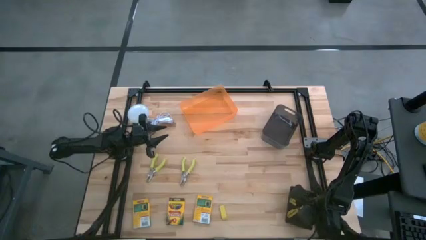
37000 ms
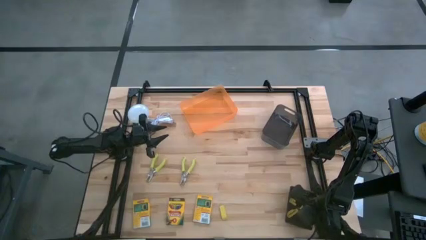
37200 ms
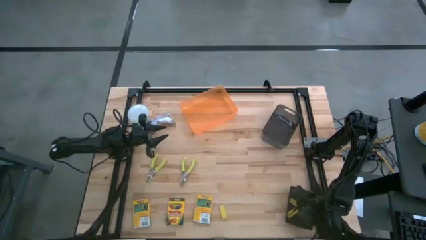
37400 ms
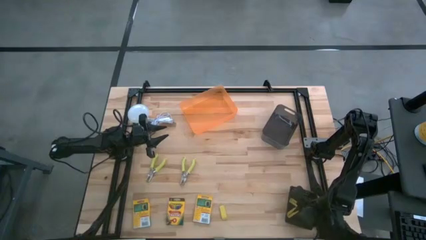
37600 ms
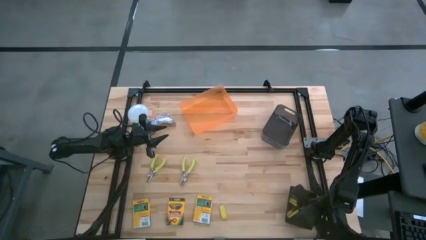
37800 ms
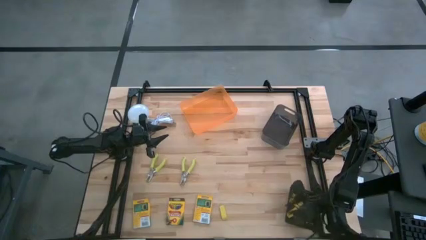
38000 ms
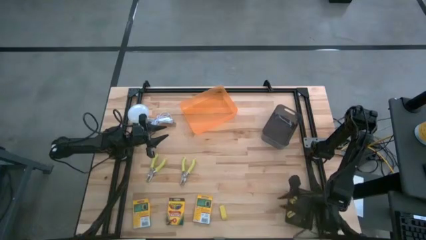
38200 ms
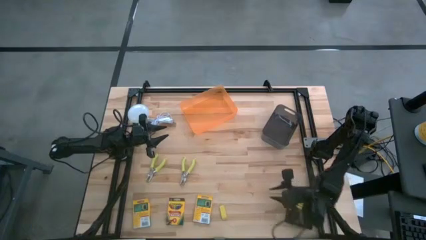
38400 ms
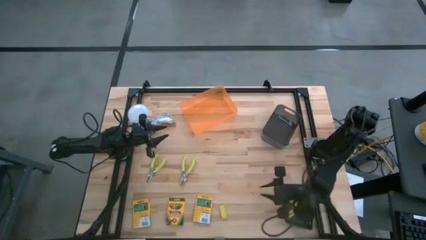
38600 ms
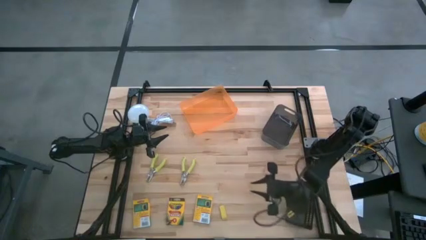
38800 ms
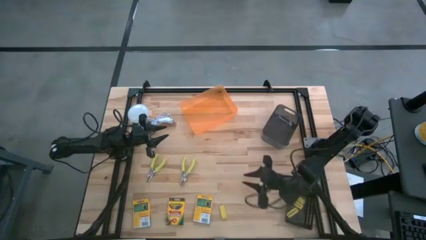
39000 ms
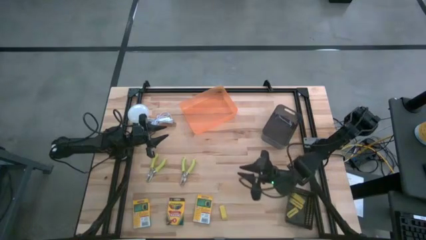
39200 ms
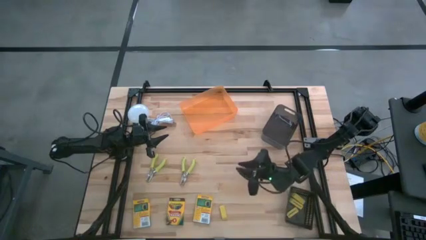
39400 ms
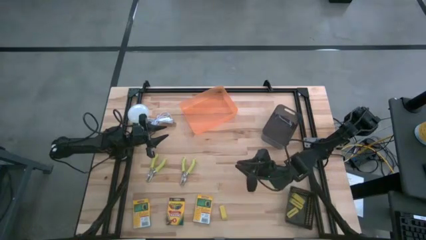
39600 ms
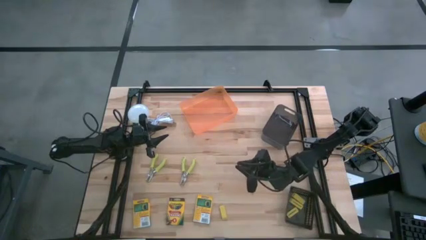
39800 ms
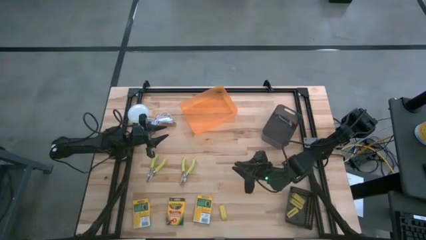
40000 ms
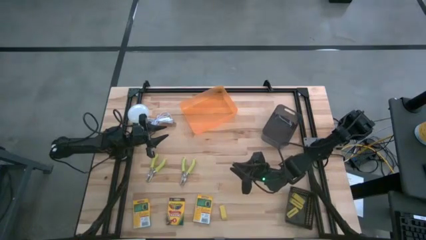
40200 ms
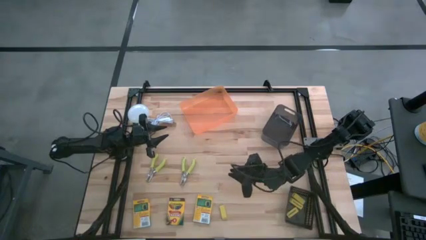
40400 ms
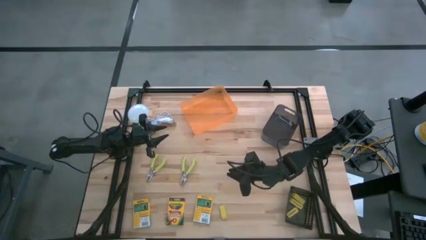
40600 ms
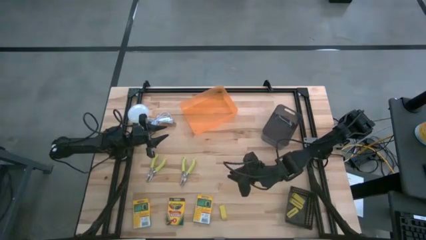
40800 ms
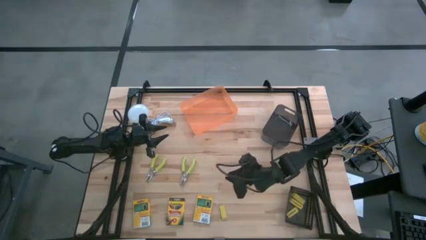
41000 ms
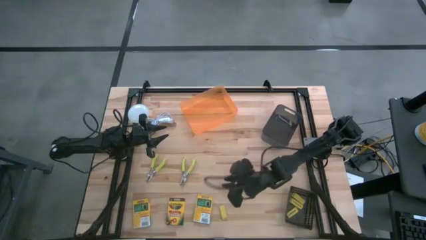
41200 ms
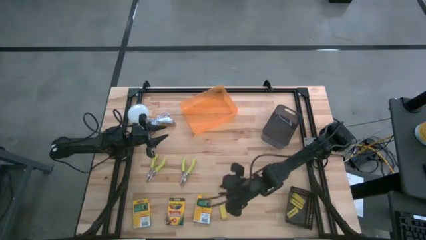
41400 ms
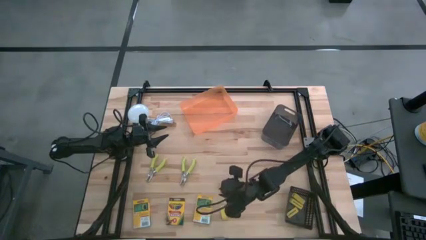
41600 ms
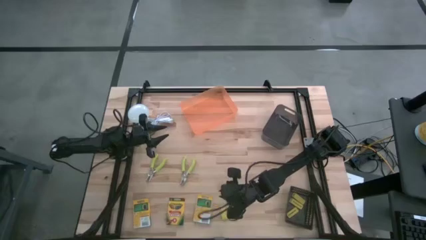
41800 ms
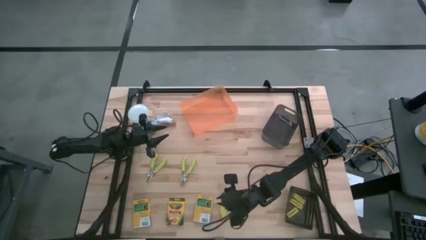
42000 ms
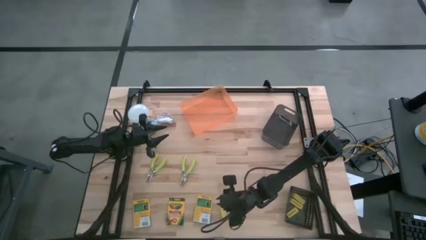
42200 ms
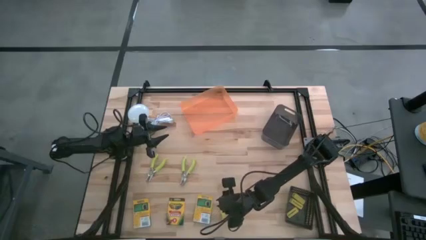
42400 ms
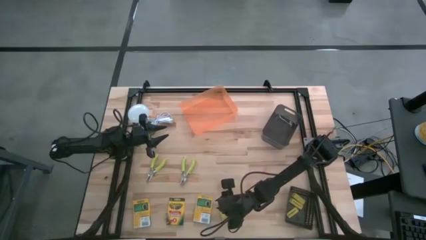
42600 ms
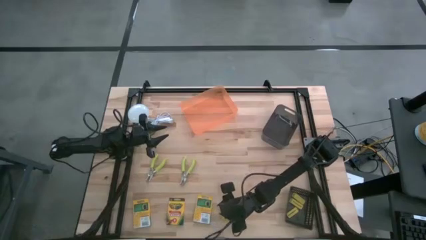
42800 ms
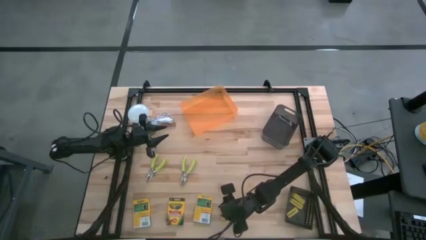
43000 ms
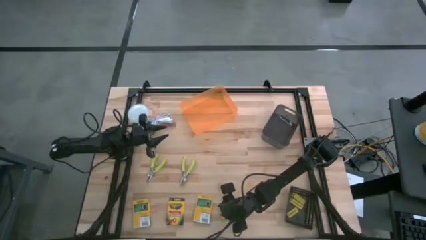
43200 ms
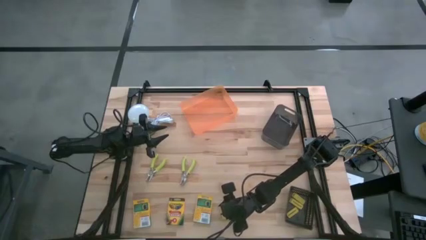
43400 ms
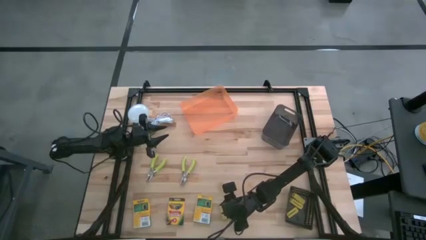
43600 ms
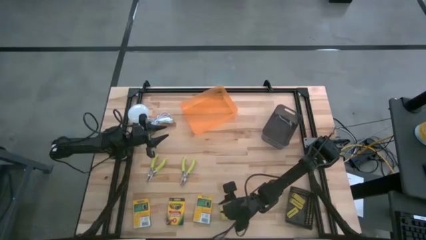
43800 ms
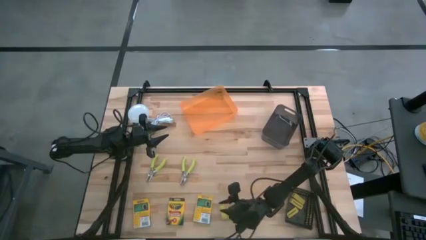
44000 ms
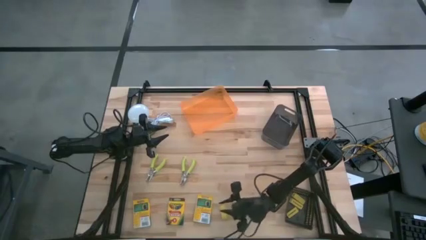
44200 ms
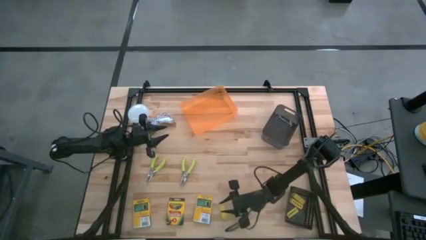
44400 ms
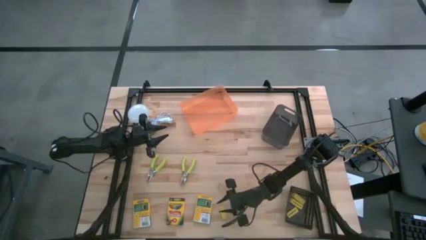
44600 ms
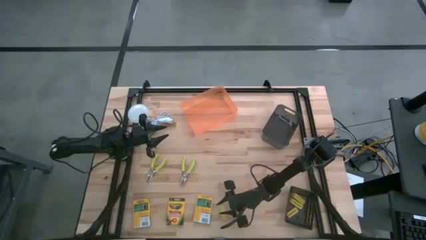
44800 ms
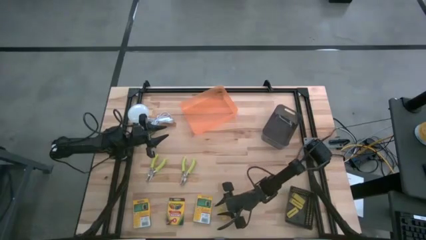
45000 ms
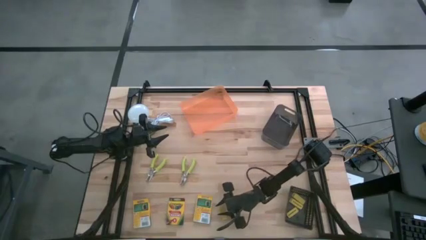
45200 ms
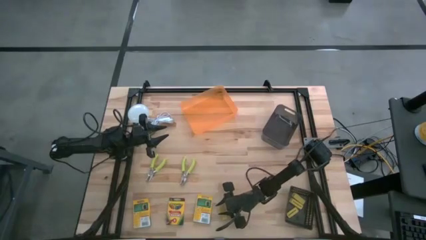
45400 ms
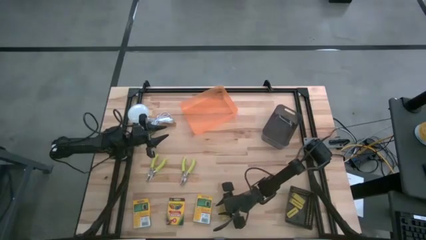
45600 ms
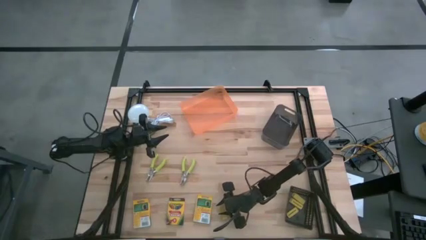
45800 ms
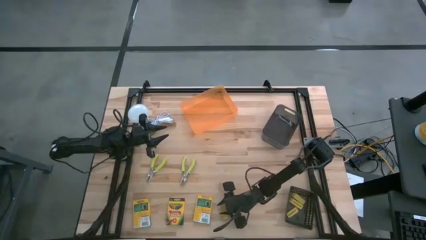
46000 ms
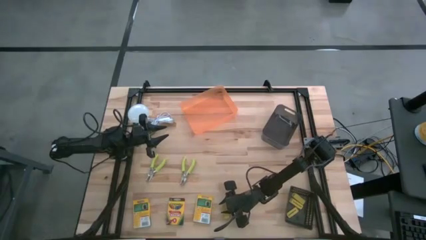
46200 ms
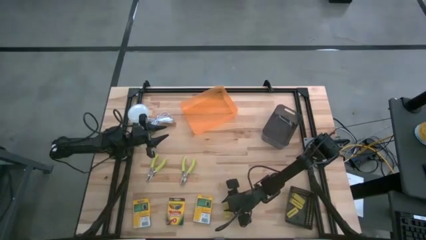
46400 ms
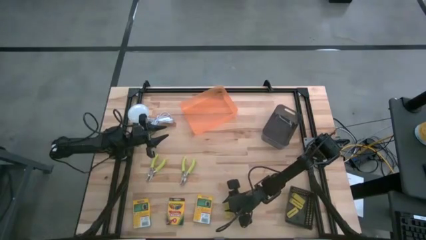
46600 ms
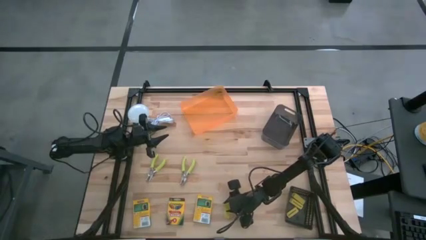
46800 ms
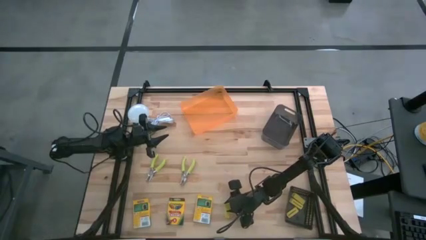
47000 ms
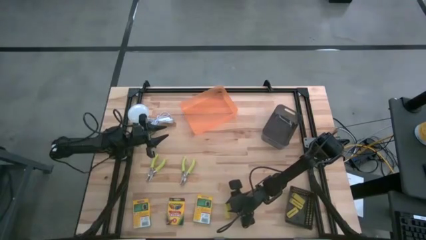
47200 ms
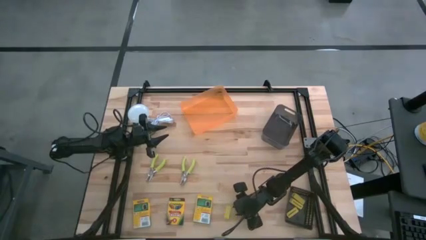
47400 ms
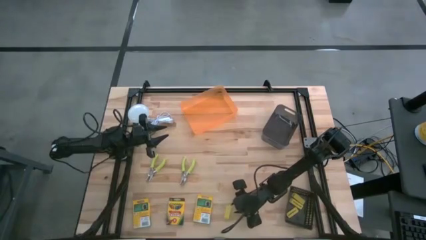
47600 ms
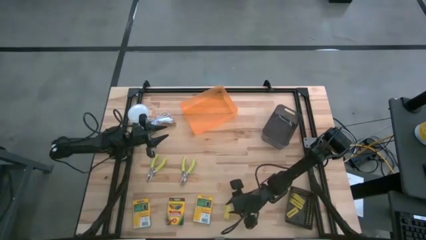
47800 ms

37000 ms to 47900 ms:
Task: Pick & Place School Supplies
Put the yellow eraser into the black basket

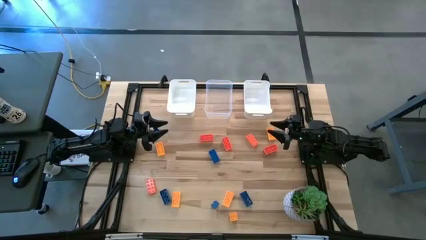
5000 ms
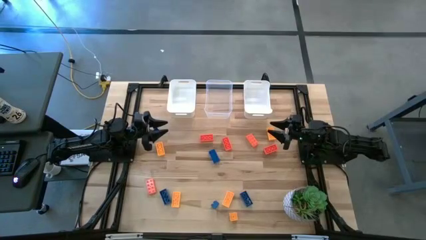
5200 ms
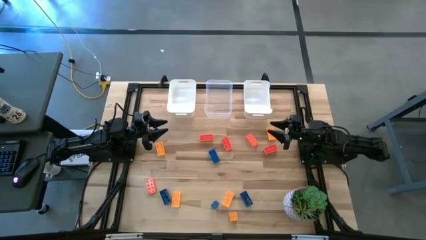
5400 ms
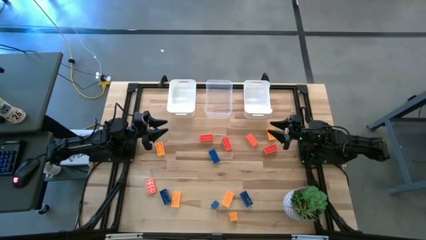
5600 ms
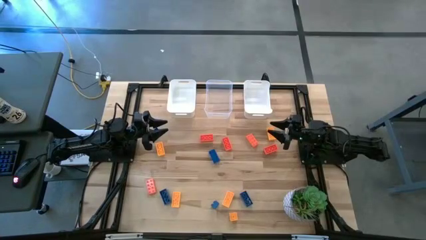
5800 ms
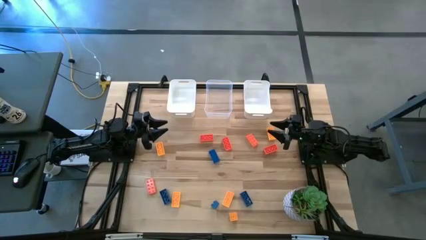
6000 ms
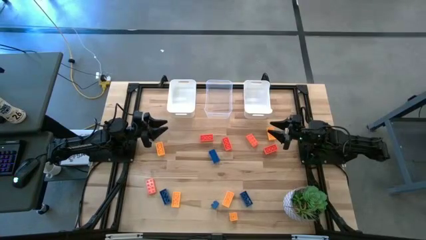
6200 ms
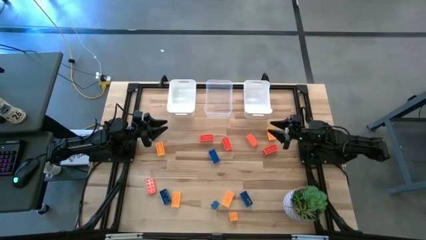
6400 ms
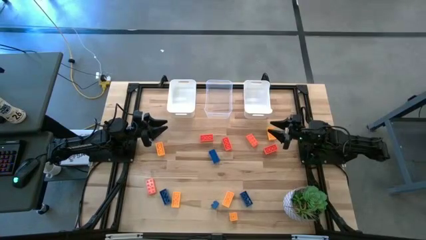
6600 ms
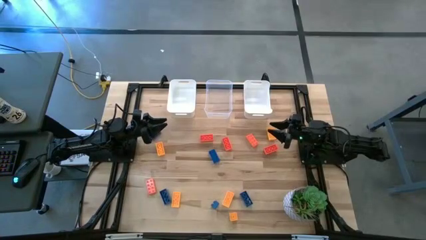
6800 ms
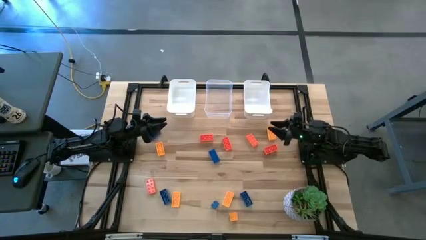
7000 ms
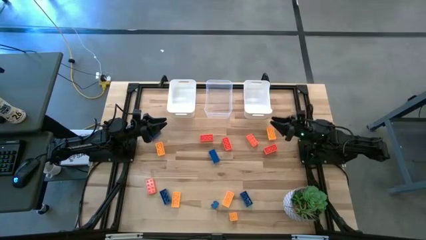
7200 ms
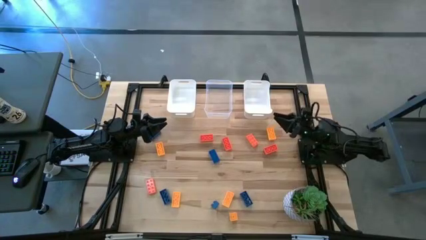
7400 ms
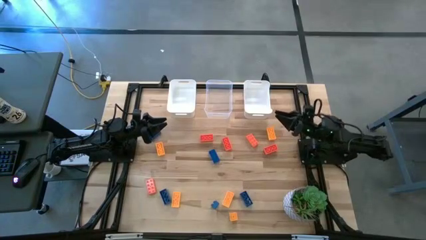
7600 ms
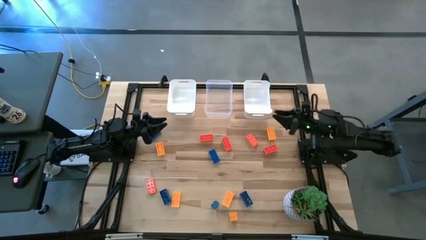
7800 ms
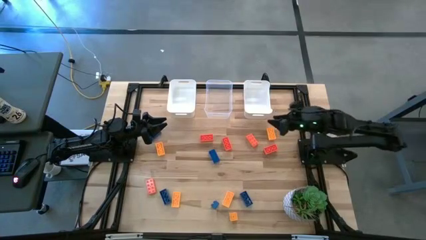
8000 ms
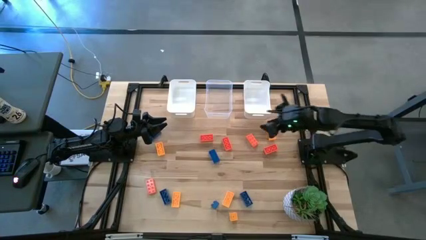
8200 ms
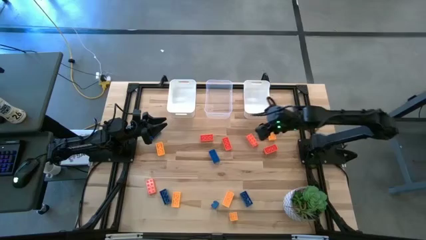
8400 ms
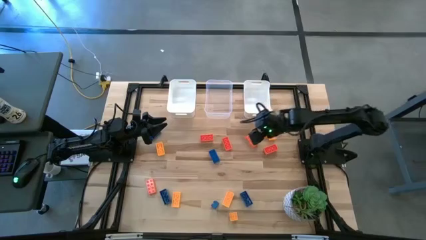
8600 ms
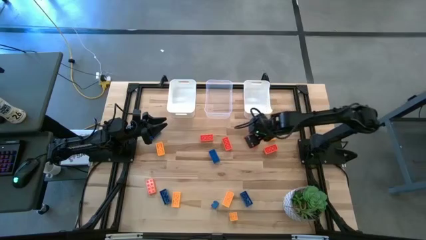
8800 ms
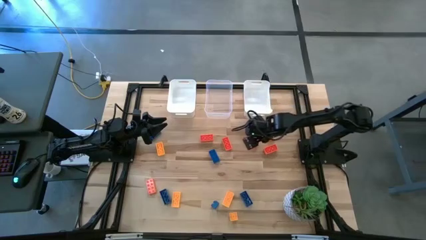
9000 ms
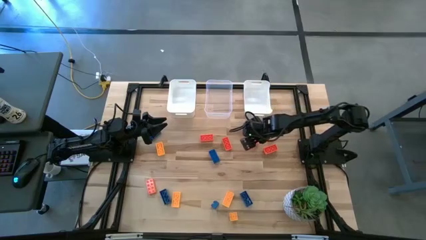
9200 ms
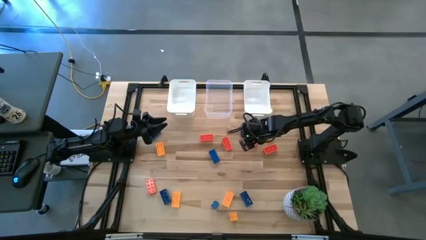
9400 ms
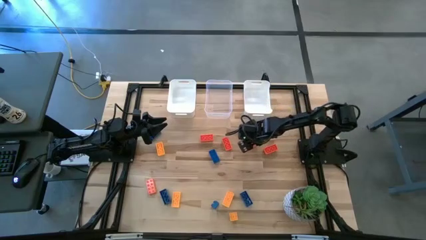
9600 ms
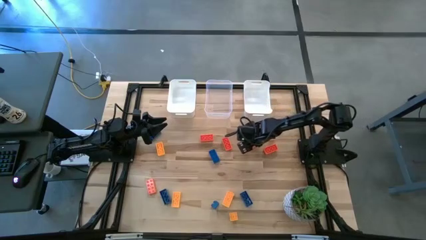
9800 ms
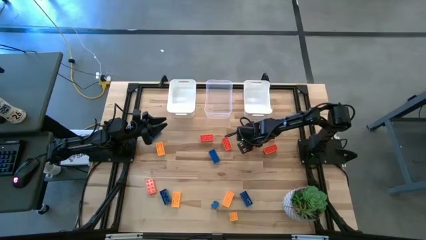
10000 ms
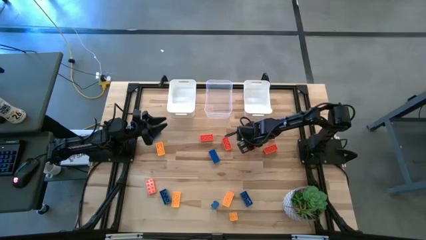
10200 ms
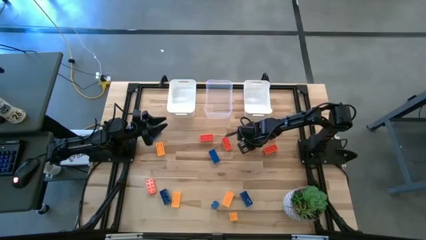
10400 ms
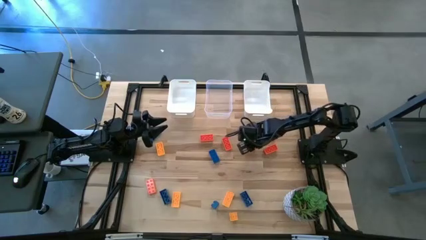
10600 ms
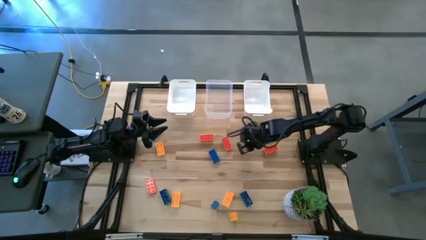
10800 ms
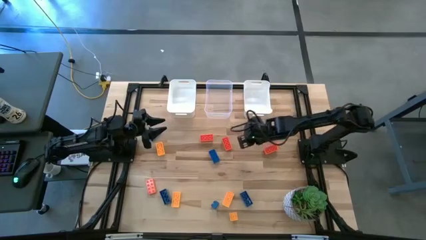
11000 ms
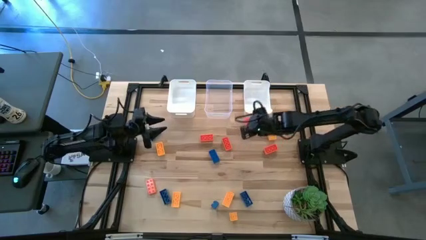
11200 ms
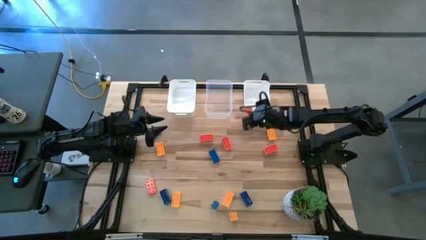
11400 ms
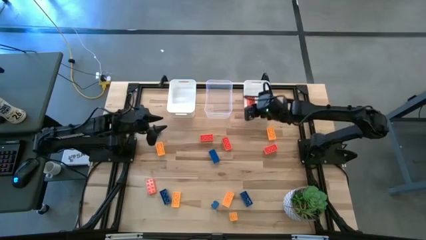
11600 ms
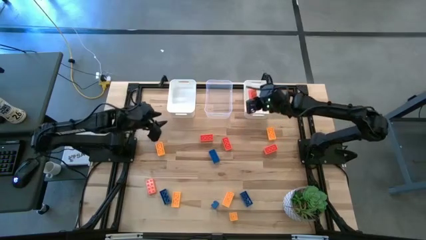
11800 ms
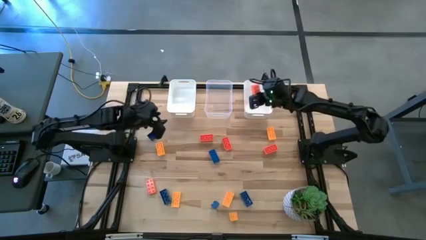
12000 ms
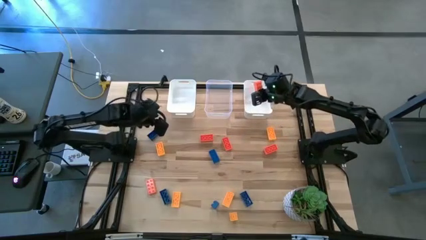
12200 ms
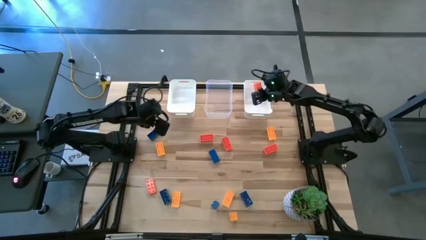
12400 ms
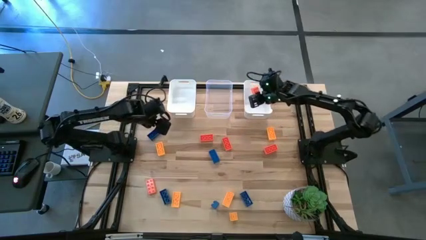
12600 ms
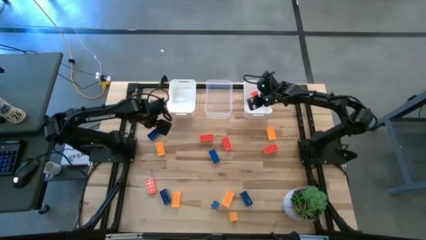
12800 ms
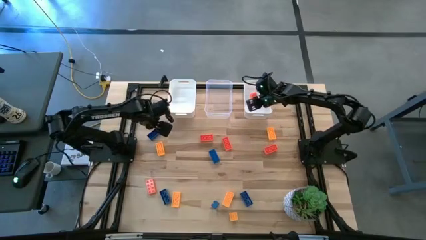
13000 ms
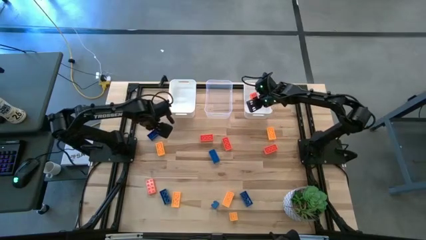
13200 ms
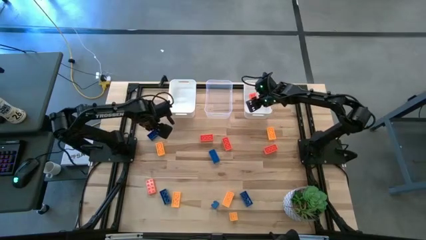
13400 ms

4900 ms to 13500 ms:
Task: Sort & place blocks by color
Put the orange game piece into the right white bin
